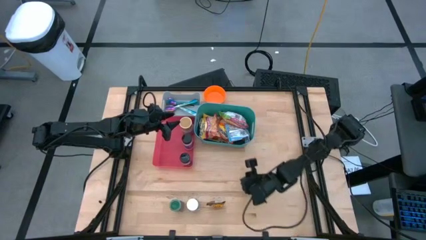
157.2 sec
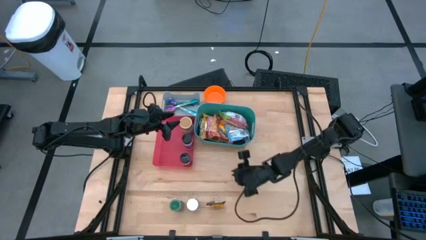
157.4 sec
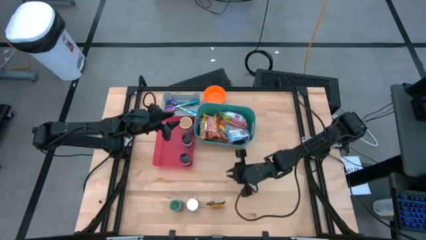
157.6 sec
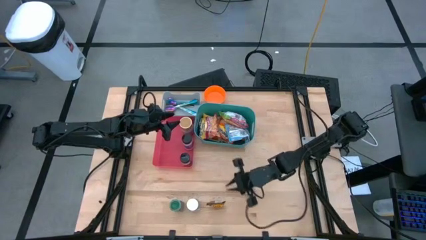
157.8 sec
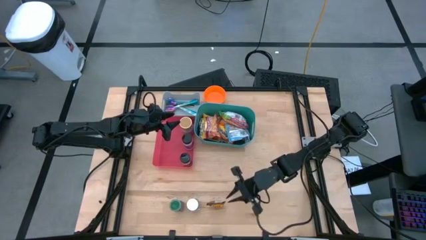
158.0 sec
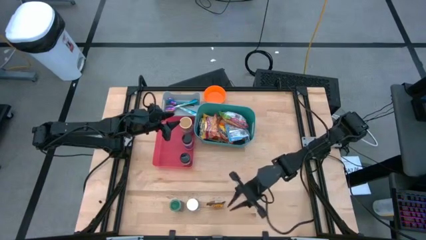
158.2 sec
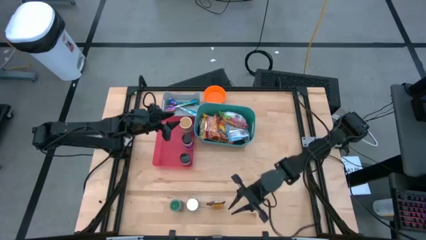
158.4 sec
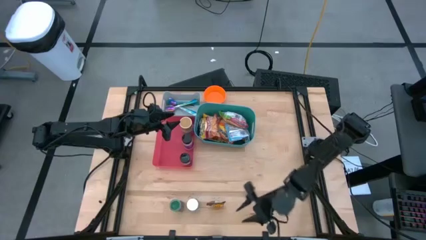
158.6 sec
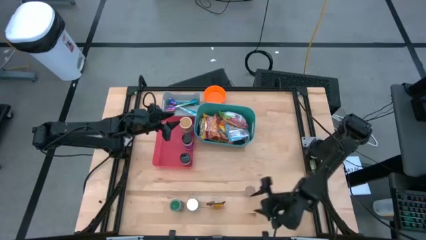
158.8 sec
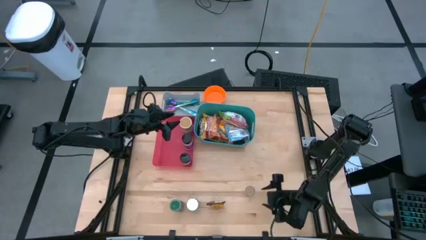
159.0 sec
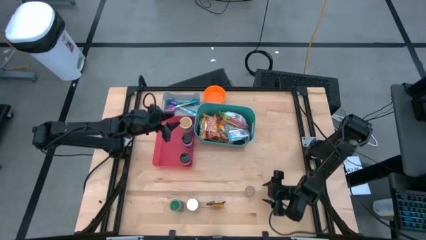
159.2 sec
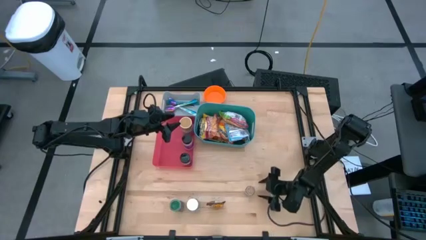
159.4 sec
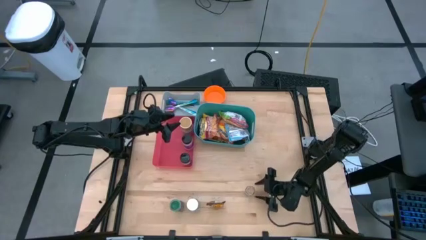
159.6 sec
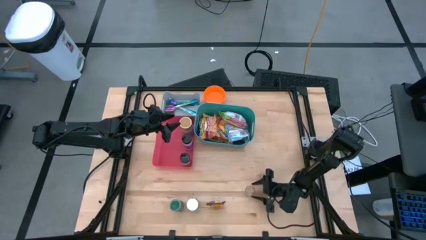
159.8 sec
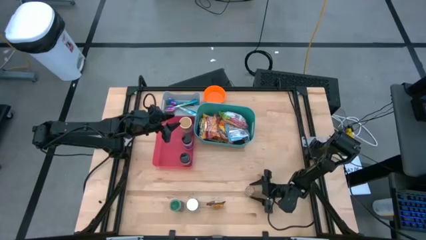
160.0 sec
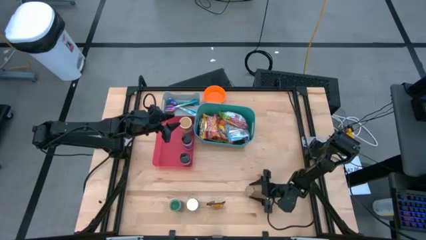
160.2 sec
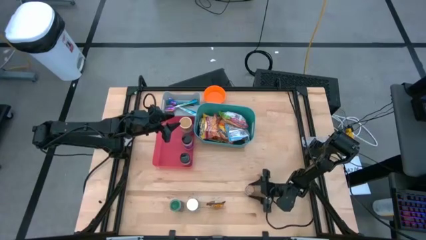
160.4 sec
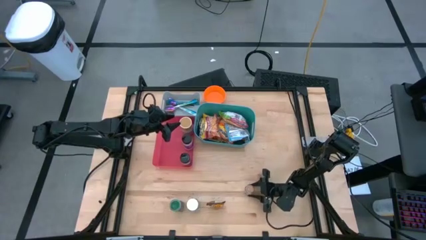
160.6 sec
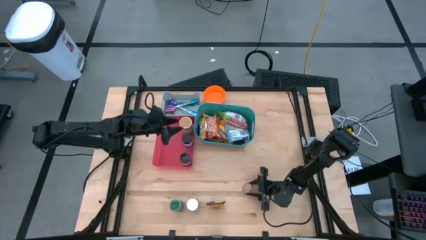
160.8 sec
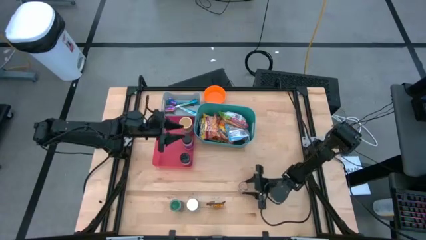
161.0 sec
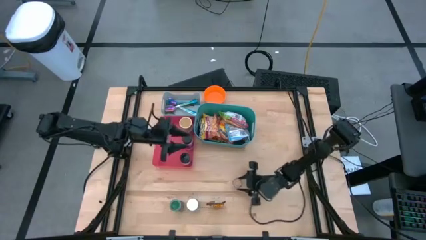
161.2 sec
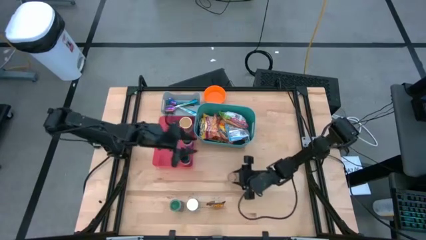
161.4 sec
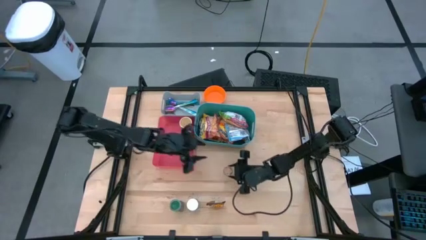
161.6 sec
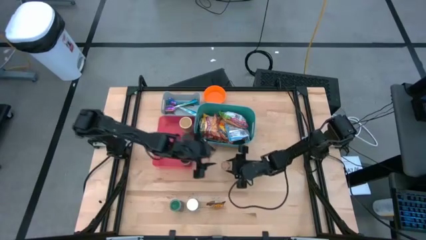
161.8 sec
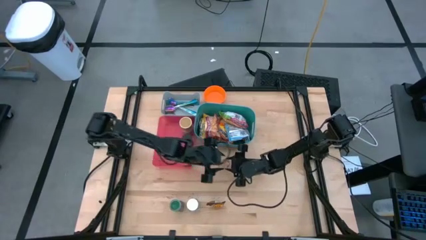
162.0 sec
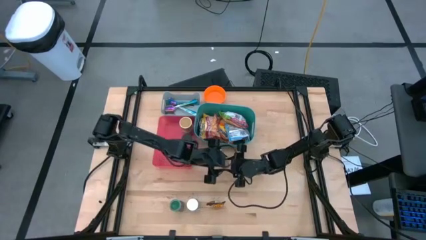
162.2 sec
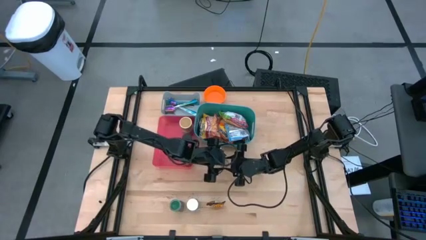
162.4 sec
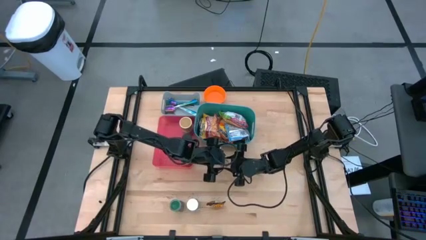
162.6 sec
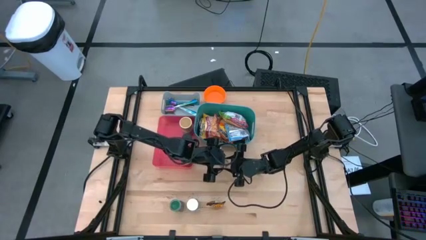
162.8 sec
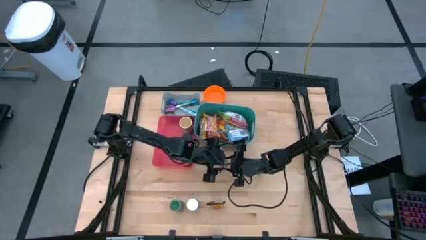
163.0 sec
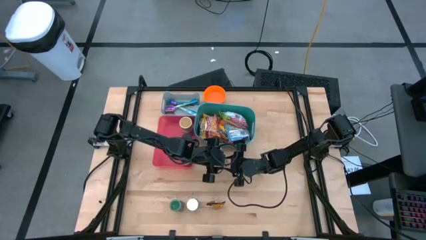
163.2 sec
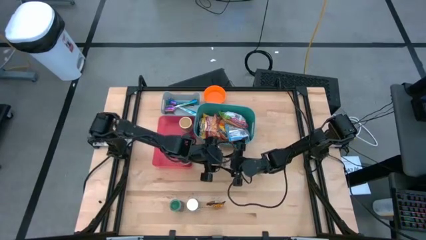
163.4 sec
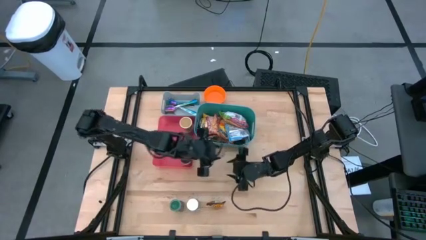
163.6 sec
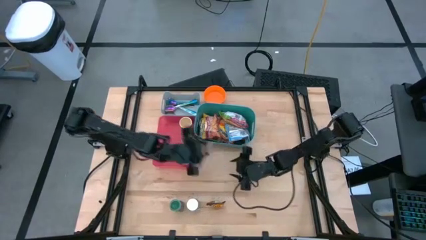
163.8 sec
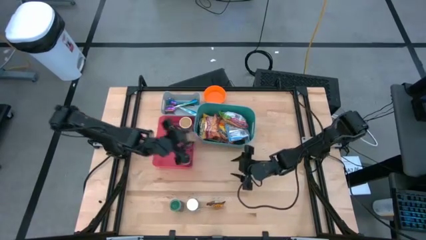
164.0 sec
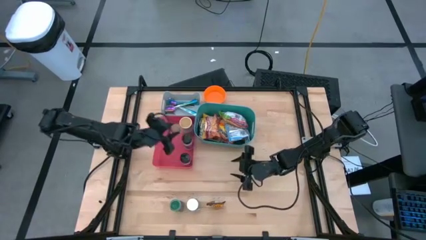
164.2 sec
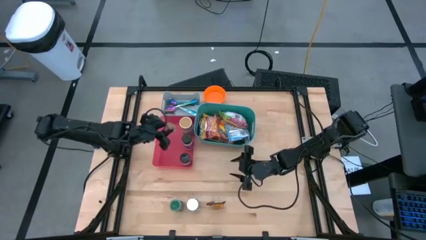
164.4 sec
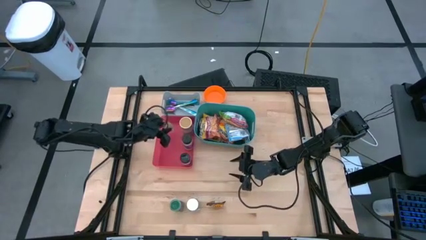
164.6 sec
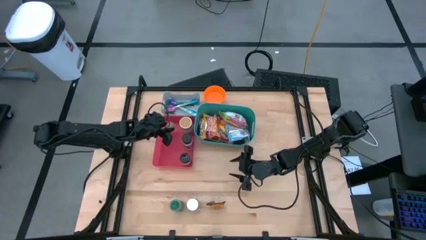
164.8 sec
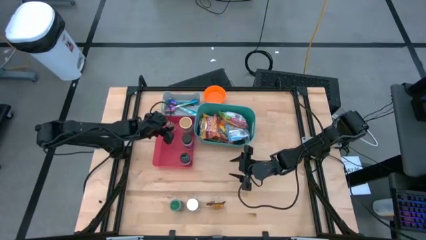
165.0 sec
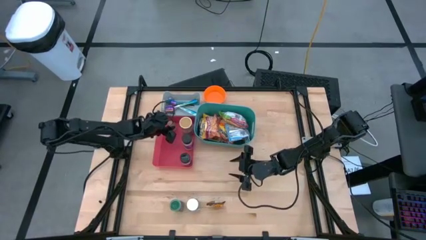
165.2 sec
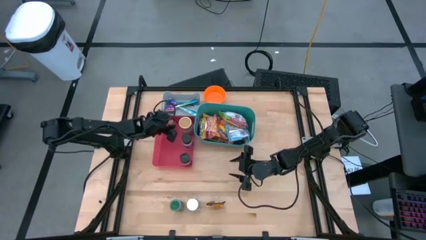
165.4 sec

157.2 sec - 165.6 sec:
Task: Pick & Place Food Item
Put the brown spice bottle into the red bin

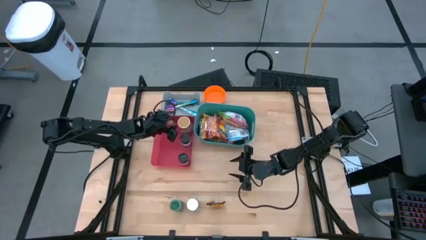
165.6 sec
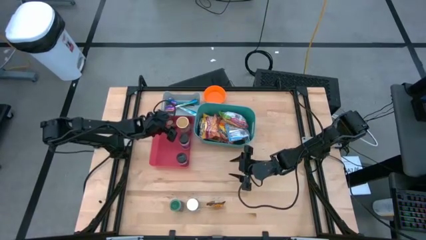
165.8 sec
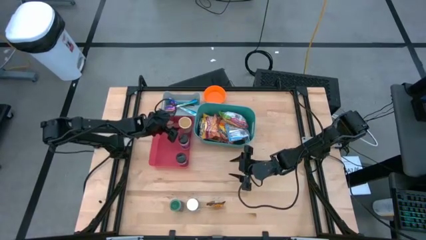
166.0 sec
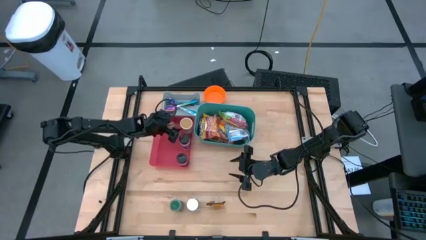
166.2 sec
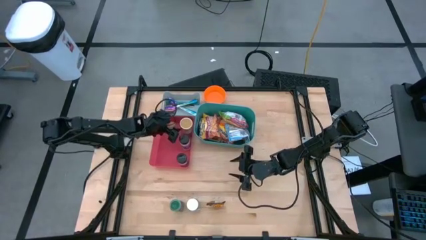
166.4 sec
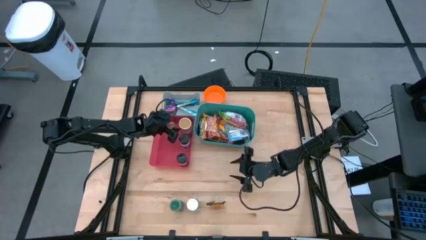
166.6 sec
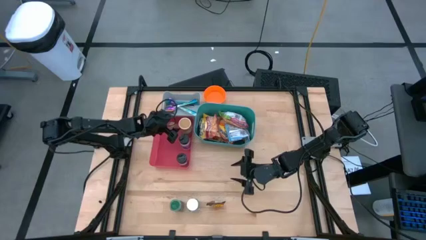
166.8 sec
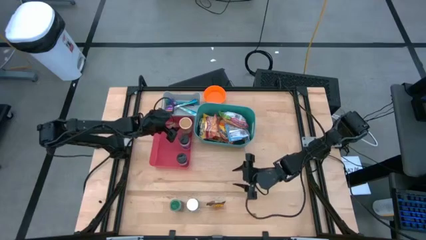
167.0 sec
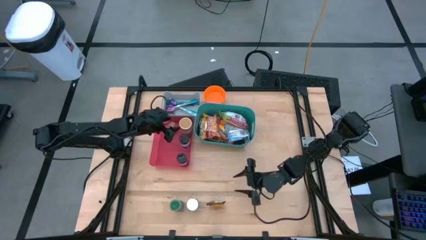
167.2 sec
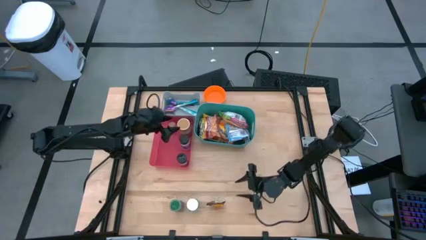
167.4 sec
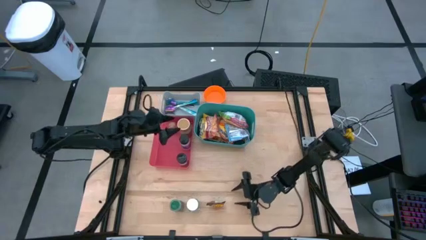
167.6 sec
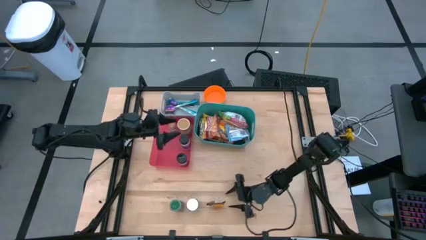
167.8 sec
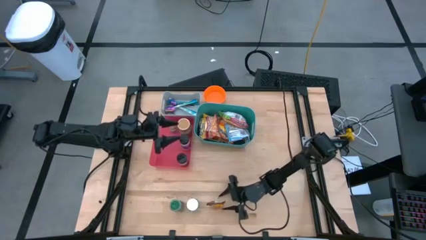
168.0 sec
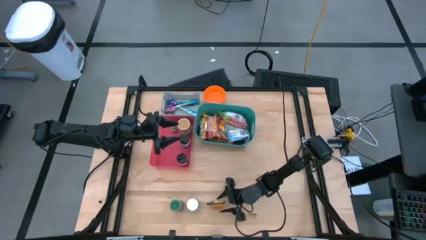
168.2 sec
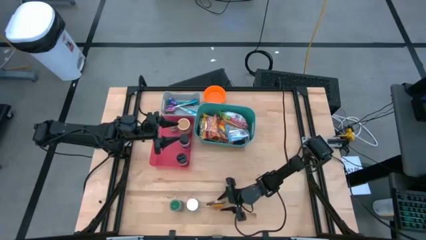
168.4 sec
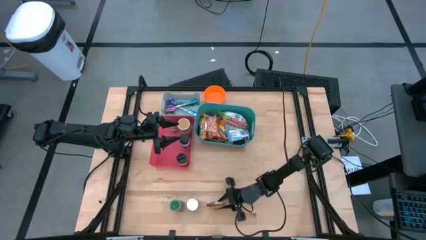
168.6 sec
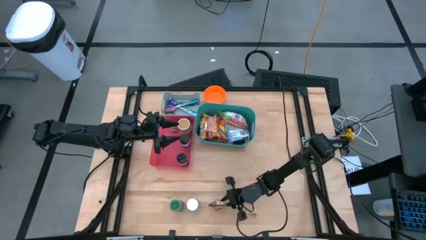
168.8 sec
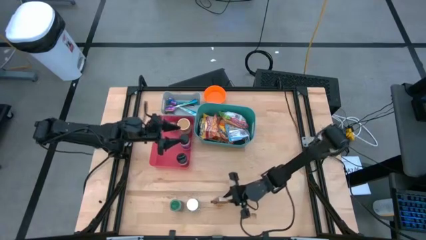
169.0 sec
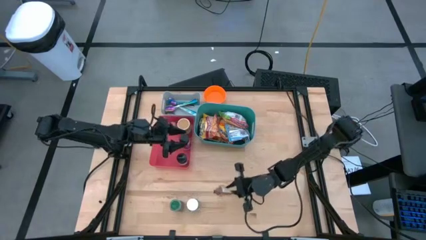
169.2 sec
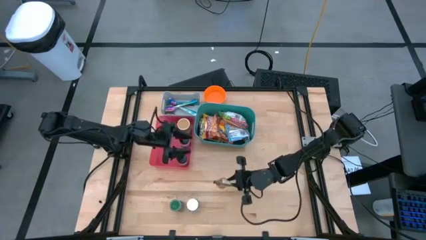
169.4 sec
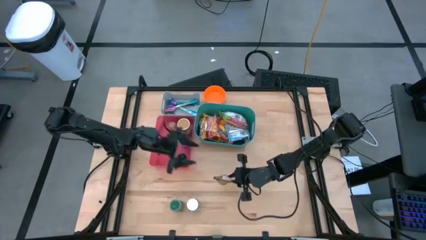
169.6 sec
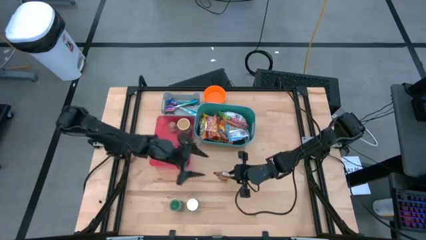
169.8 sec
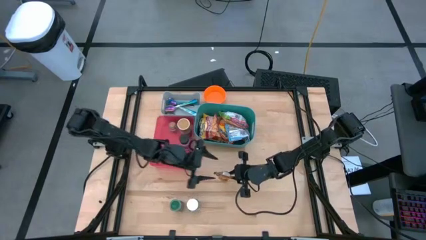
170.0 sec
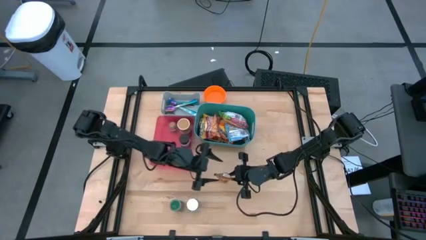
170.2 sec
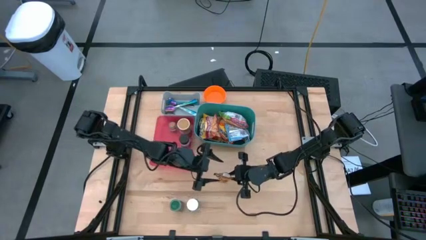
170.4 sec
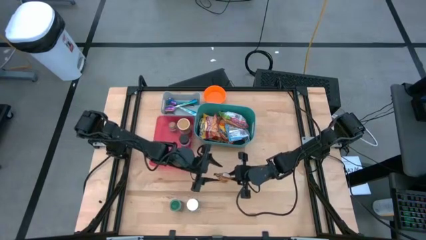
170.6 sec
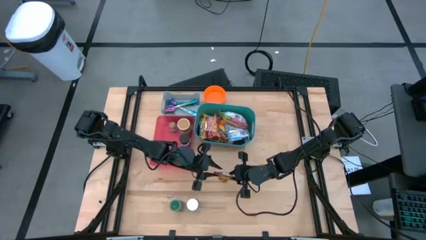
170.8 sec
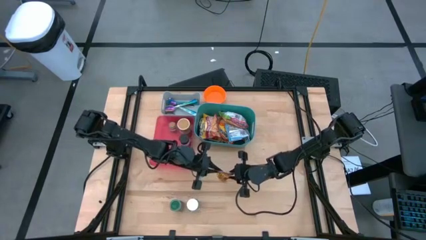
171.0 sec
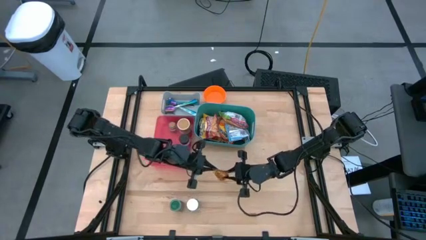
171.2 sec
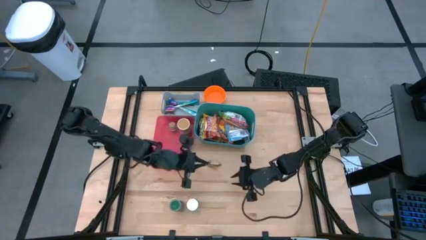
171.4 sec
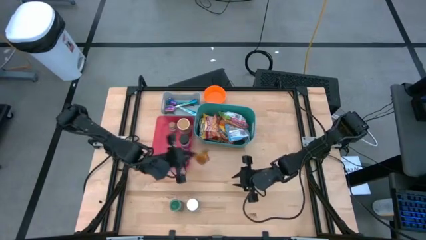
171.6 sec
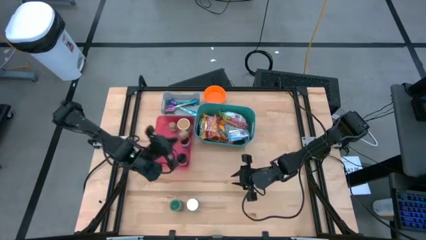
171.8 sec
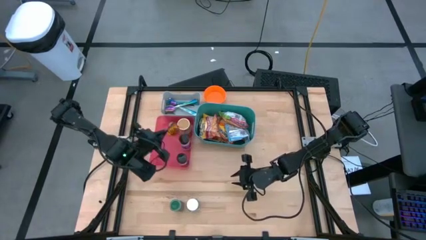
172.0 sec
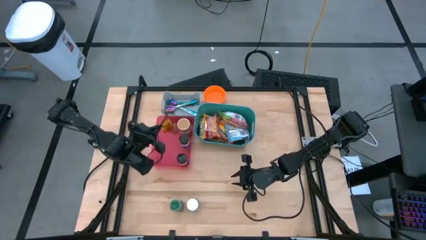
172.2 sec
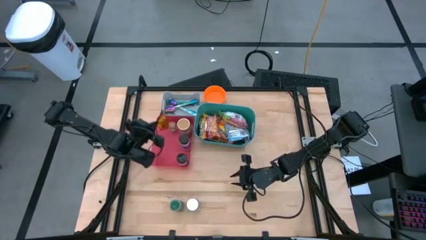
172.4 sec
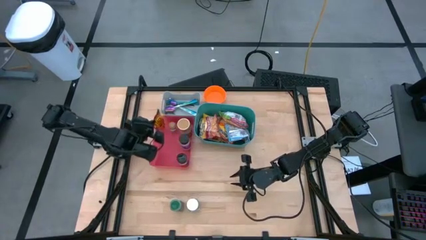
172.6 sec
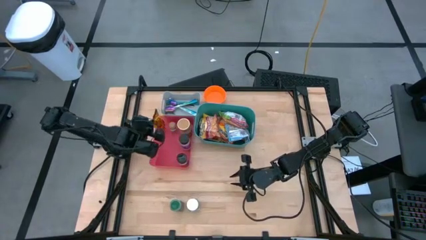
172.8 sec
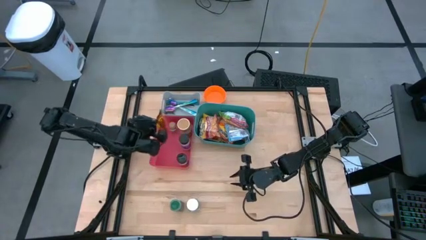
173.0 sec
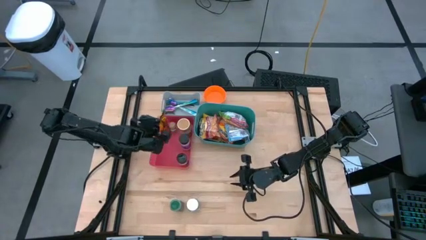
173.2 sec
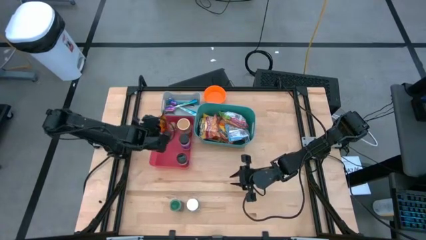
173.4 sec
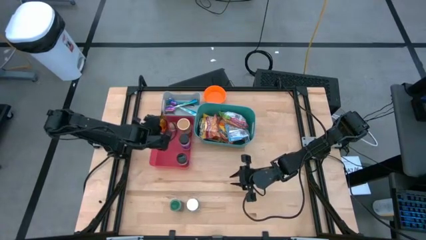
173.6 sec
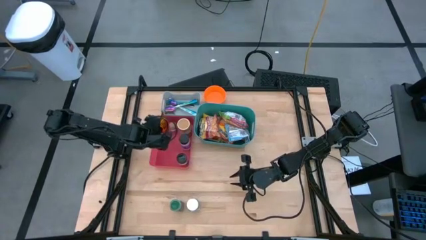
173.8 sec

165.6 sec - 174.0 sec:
Put the orange spice pack into the red bin
